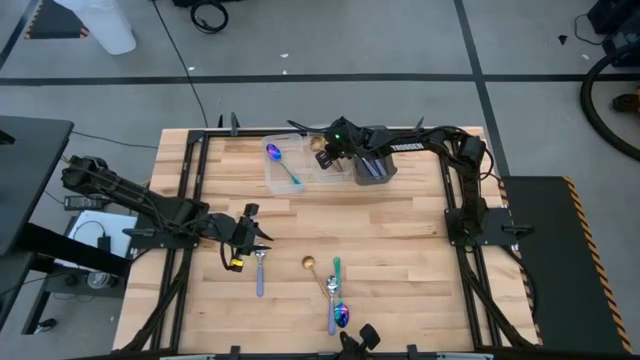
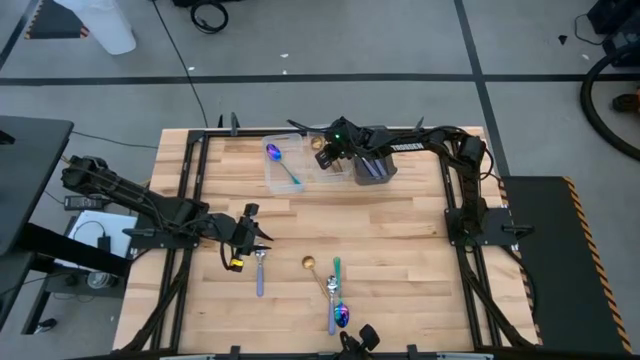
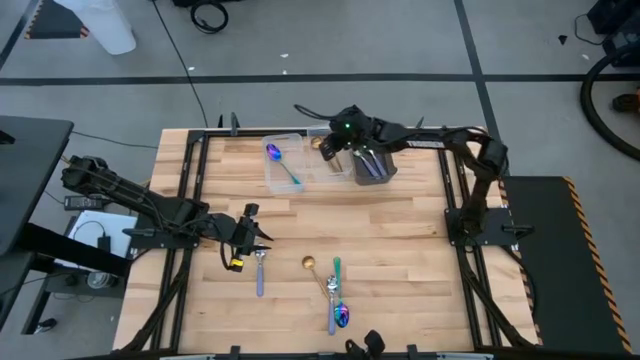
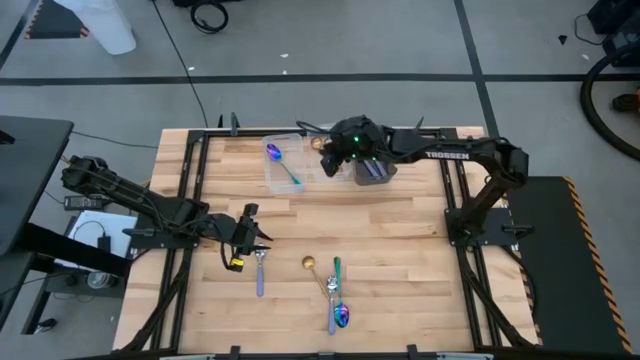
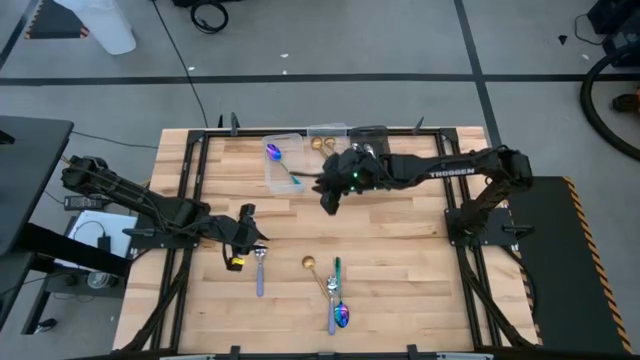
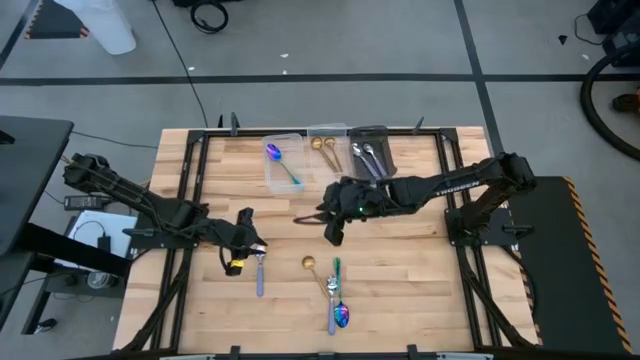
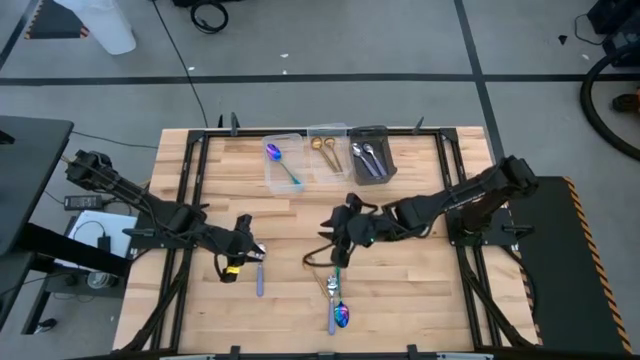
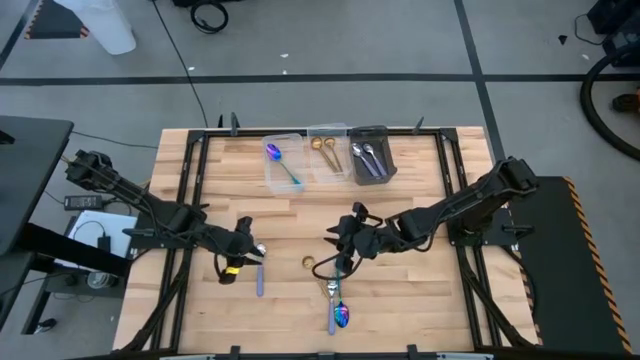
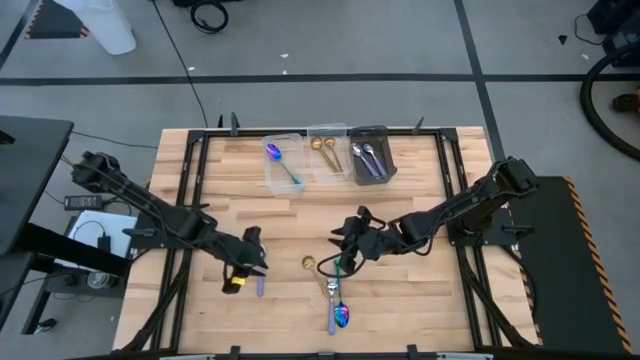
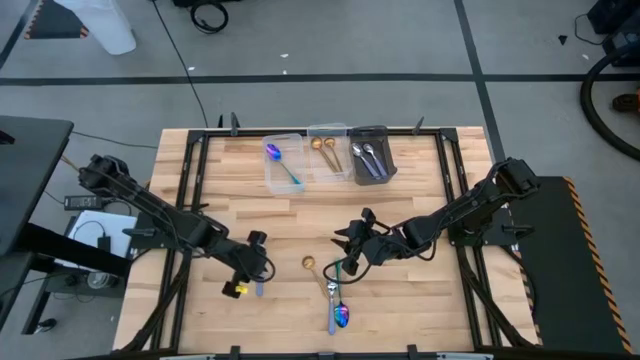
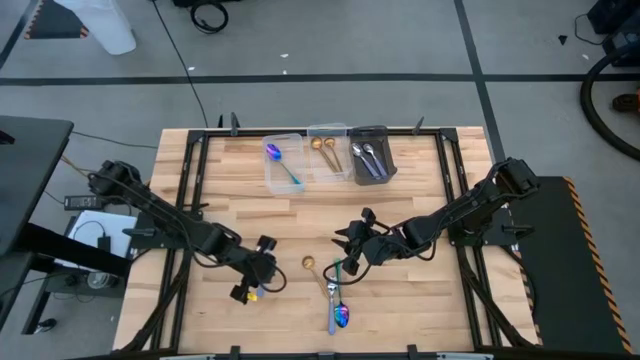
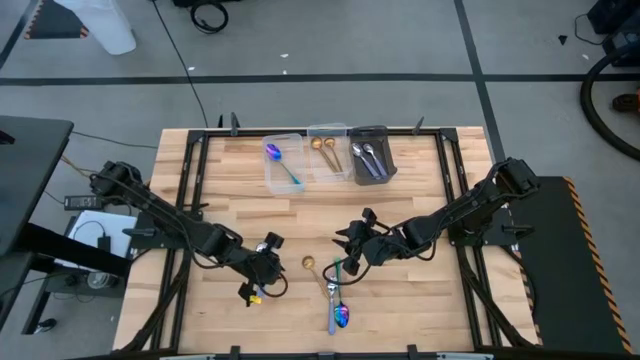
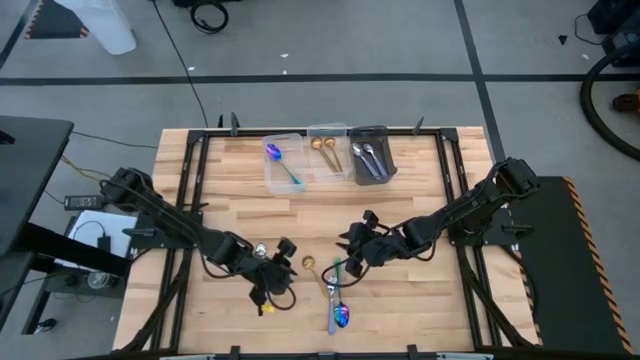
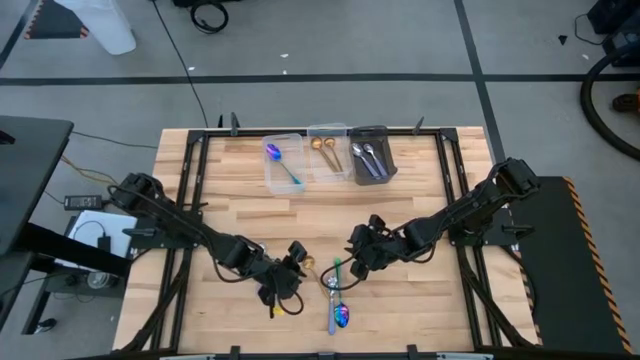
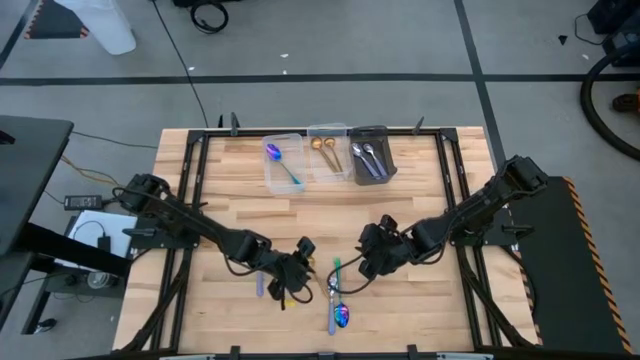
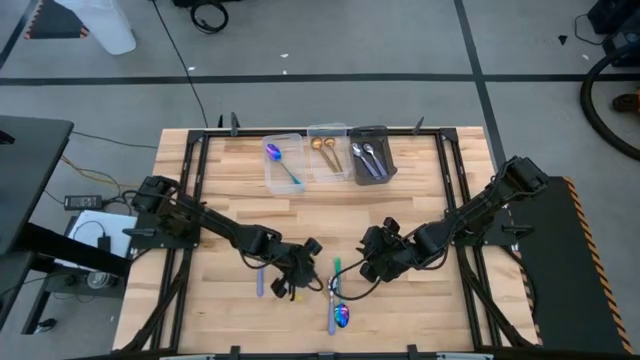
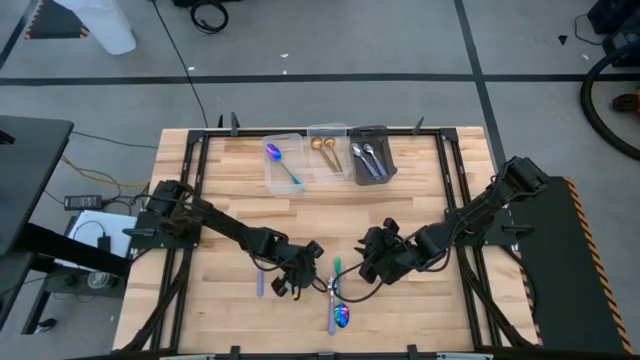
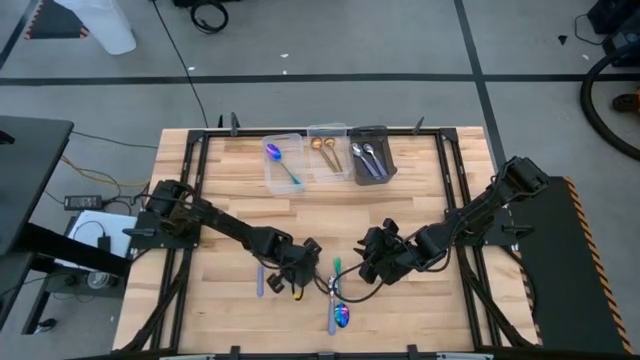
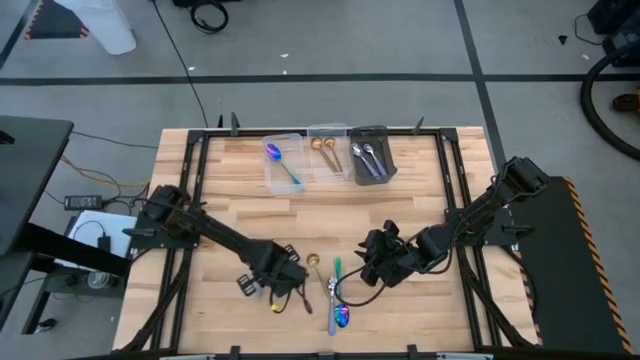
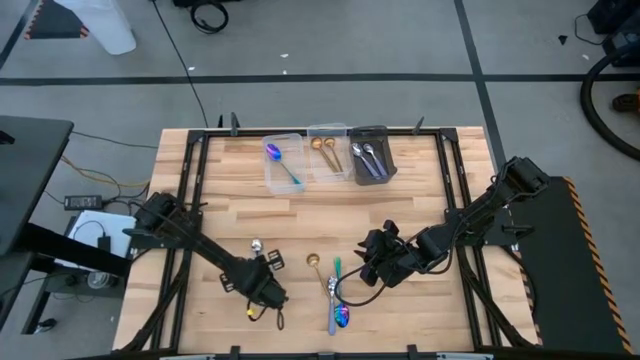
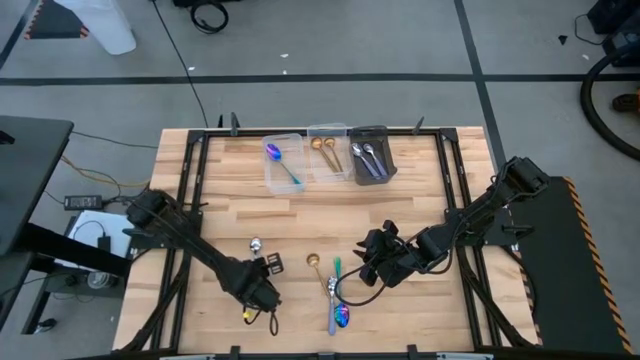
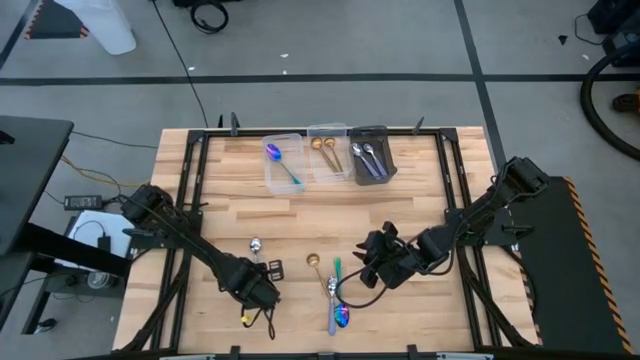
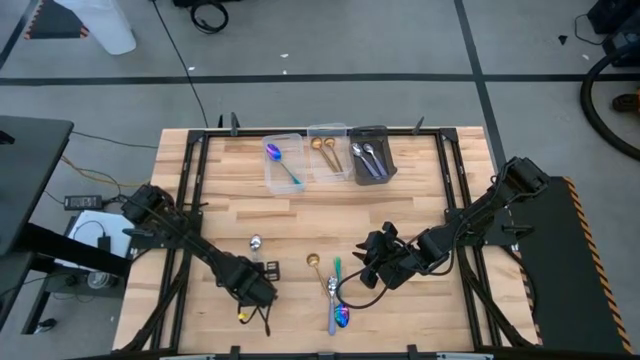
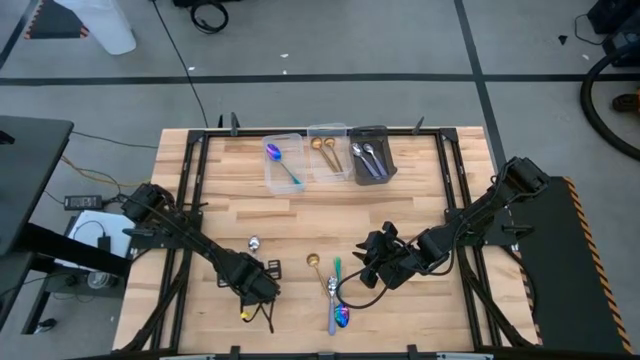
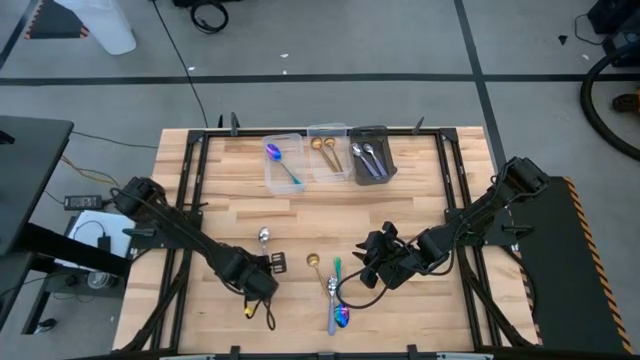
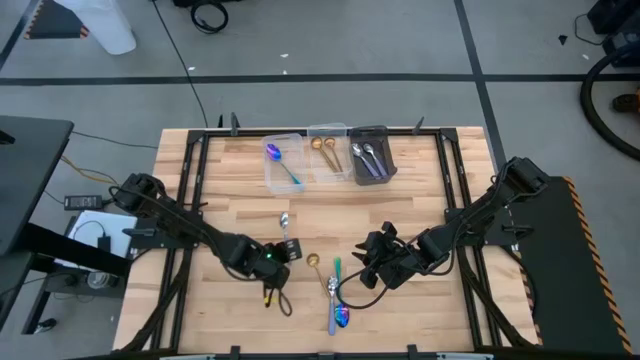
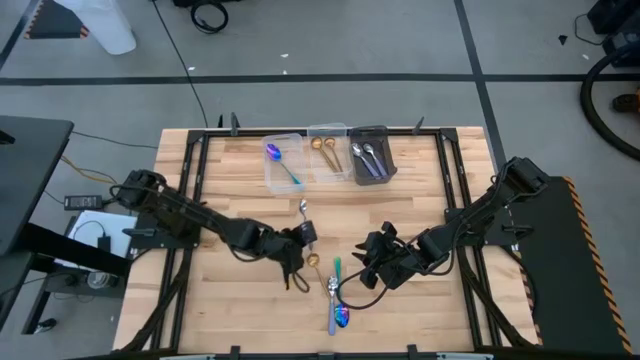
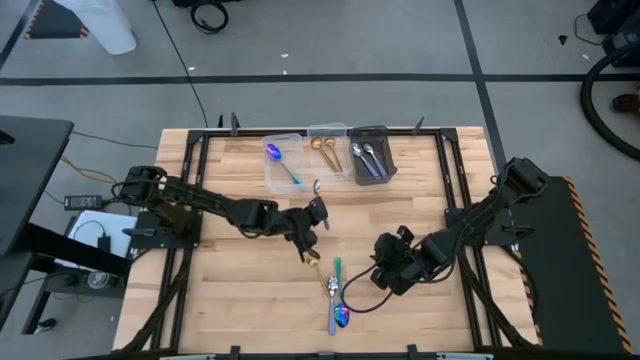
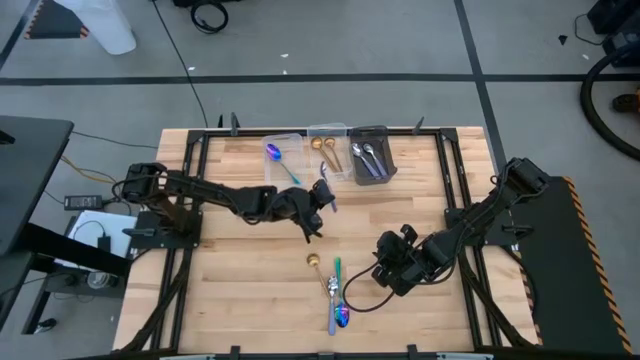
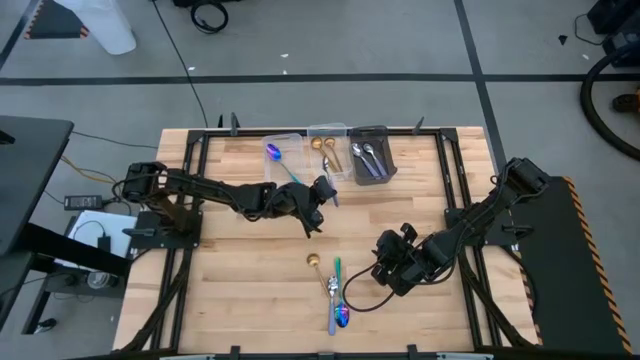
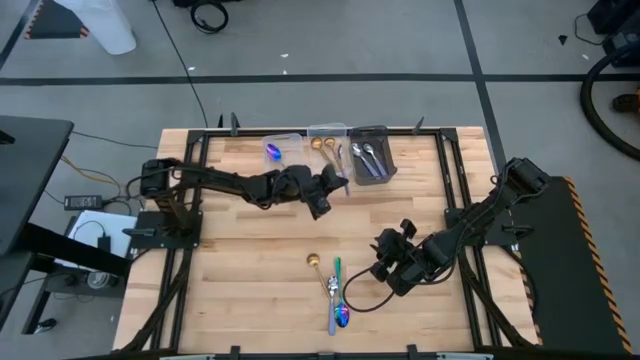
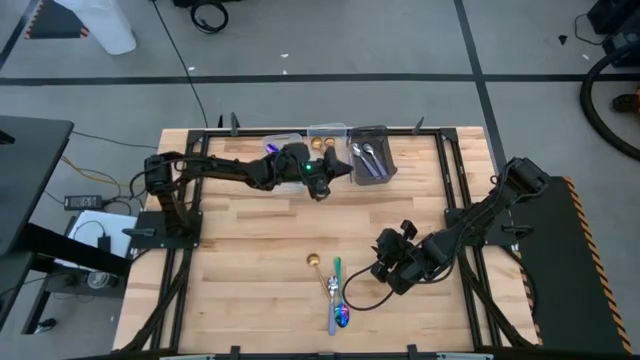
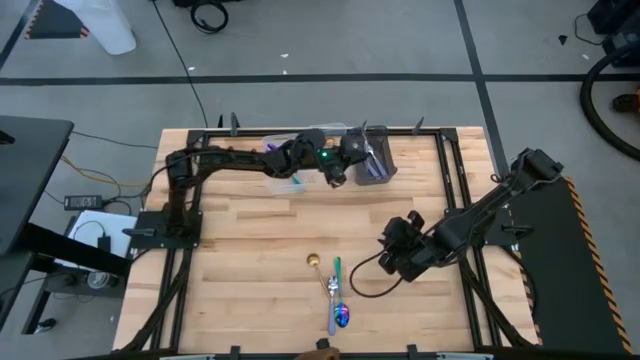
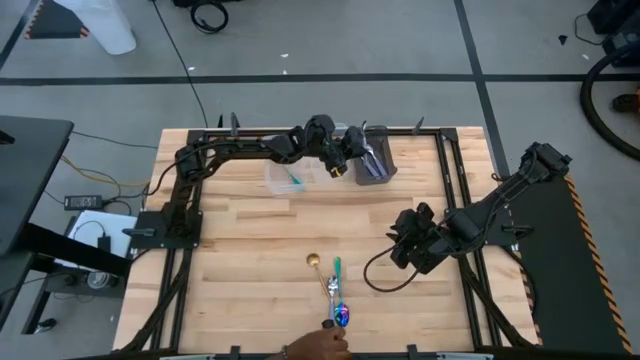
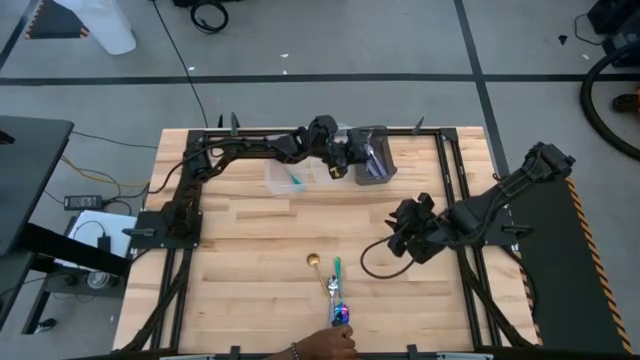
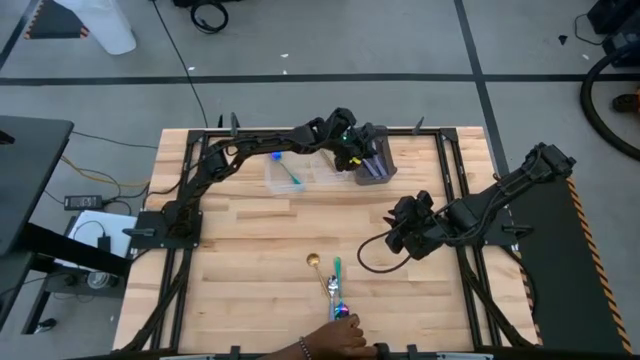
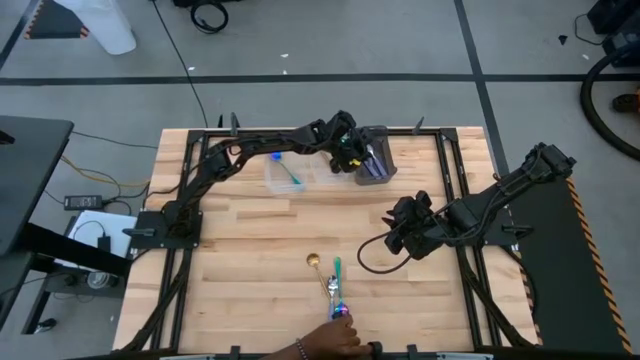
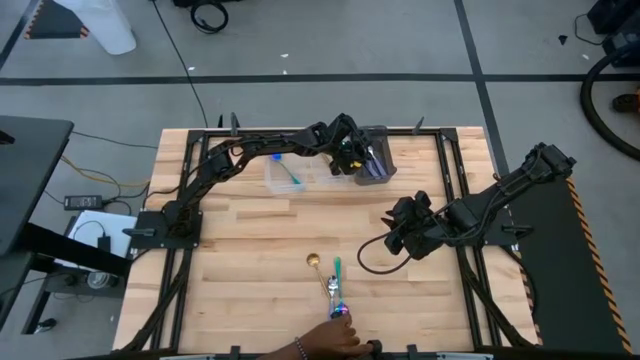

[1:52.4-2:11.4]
Task: Sort silverware by color (type)
Put the violet spoon into the black bin

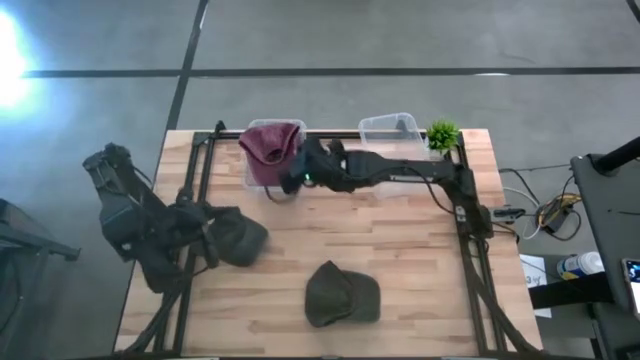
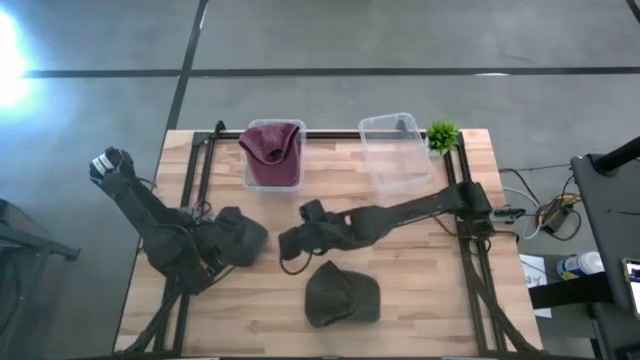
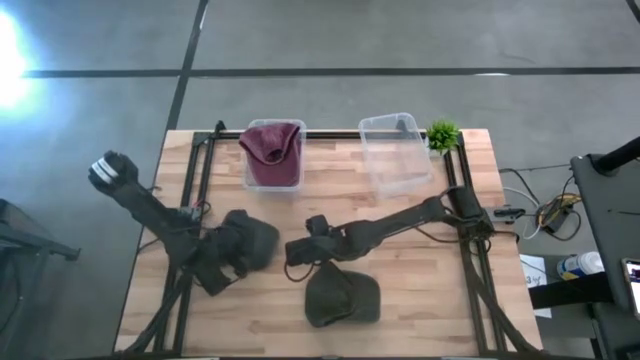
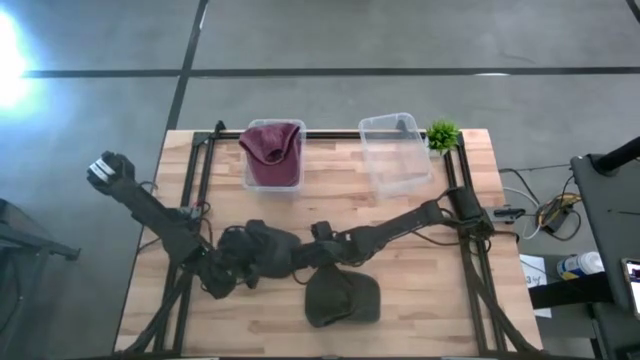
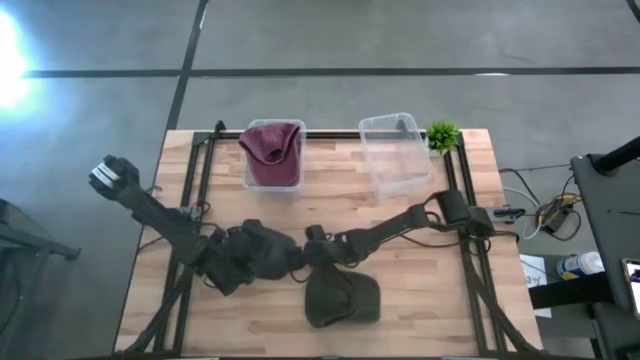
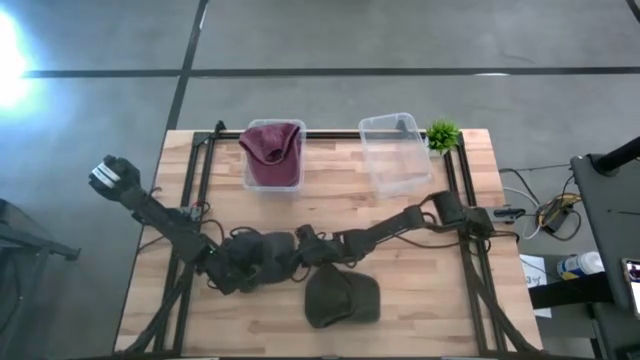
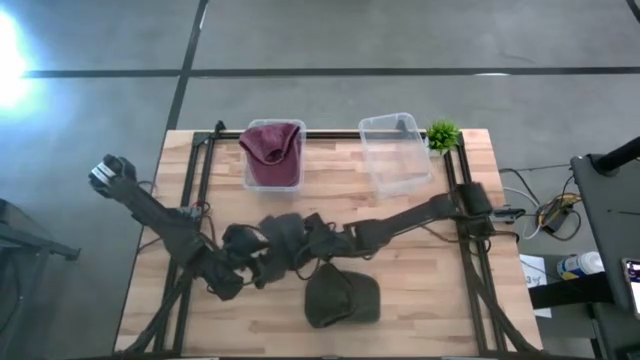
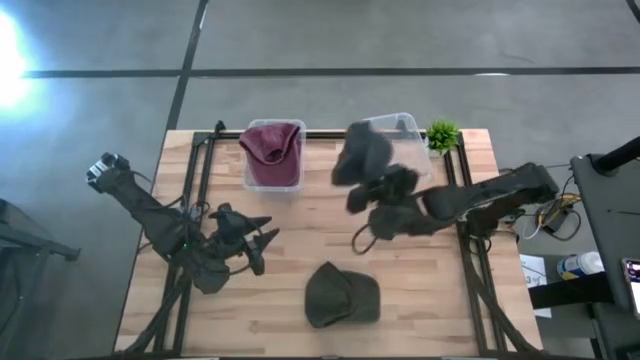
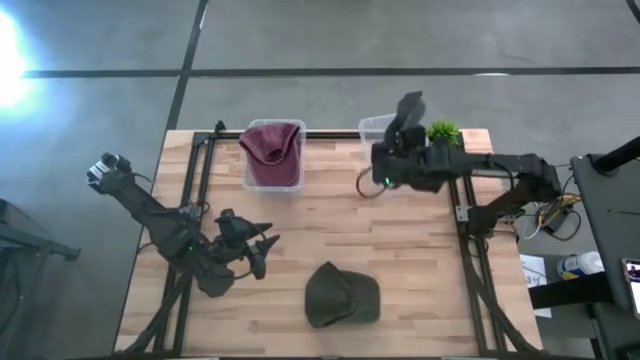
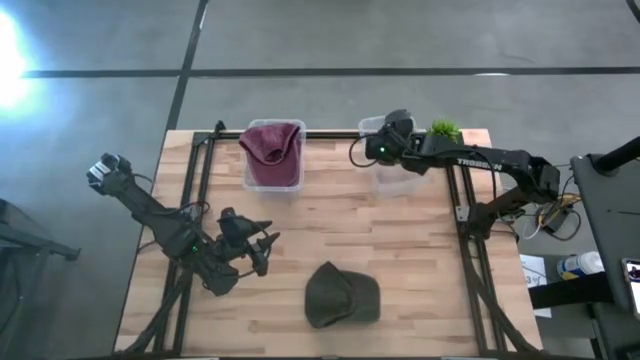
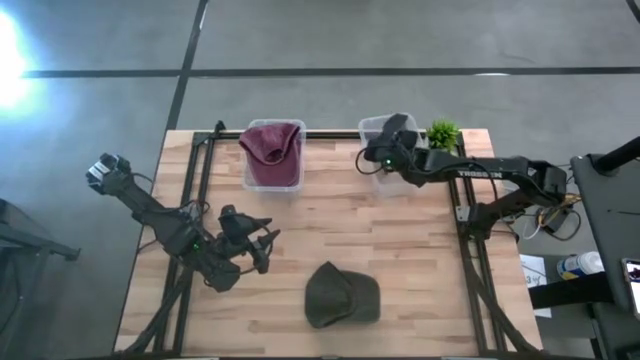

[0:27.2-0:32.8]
Task: Pick & Place hat
Put the left black cap into the right transparent bin
